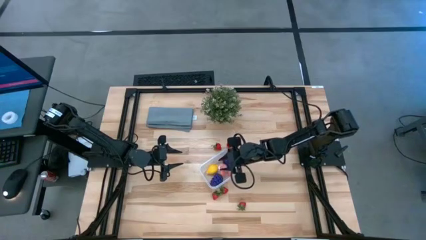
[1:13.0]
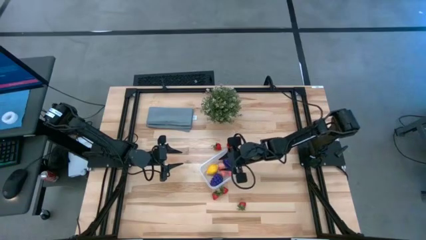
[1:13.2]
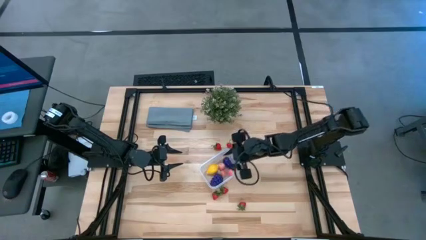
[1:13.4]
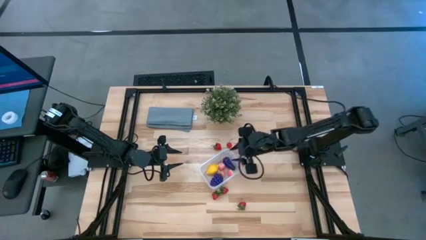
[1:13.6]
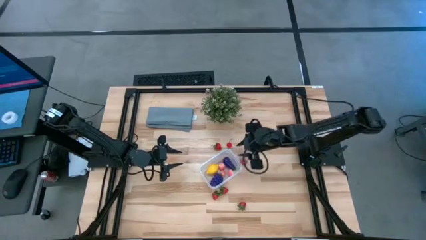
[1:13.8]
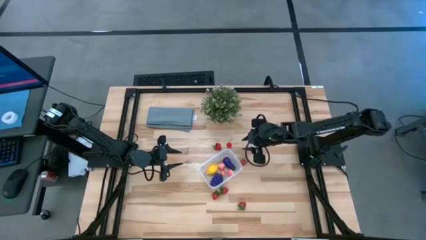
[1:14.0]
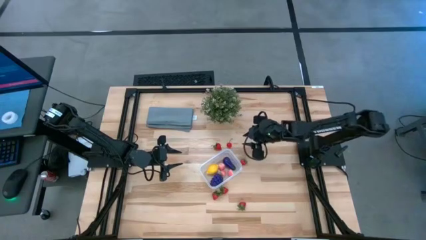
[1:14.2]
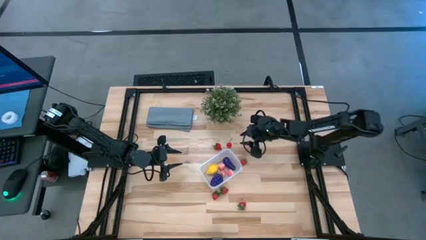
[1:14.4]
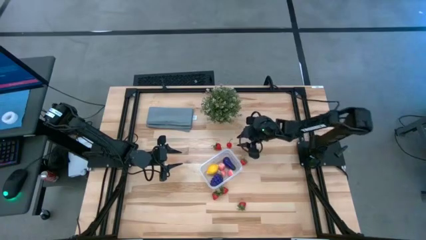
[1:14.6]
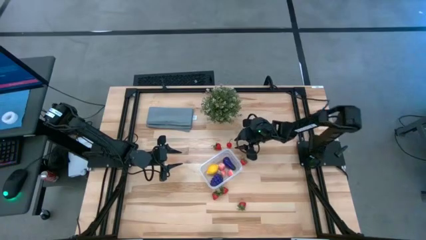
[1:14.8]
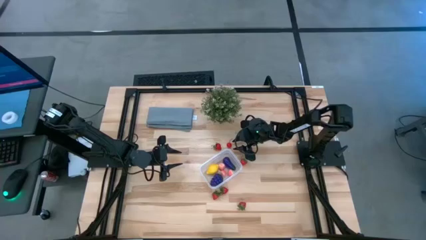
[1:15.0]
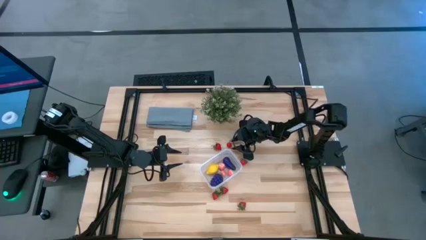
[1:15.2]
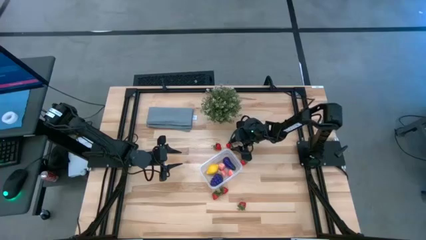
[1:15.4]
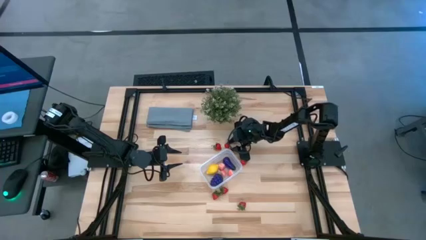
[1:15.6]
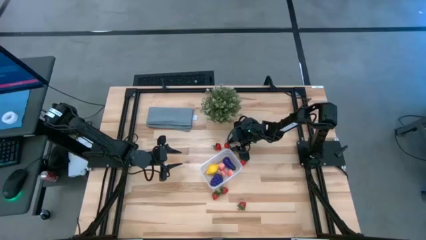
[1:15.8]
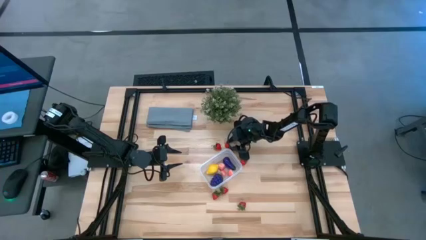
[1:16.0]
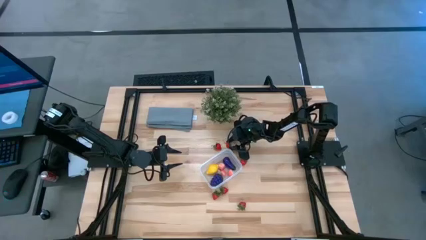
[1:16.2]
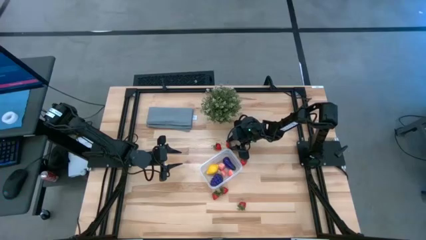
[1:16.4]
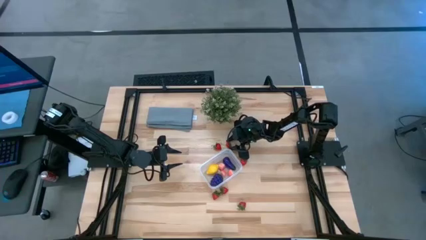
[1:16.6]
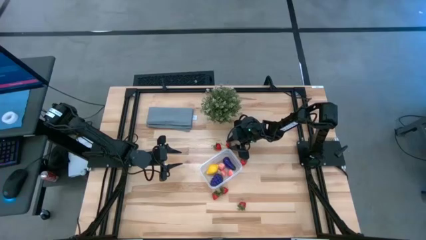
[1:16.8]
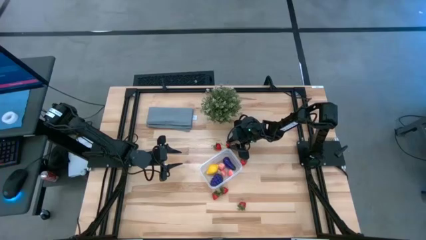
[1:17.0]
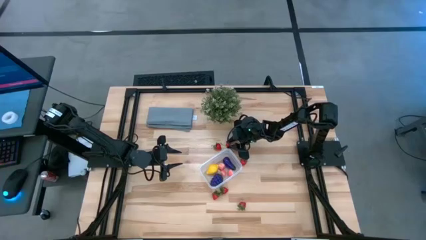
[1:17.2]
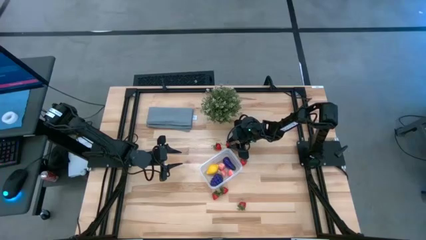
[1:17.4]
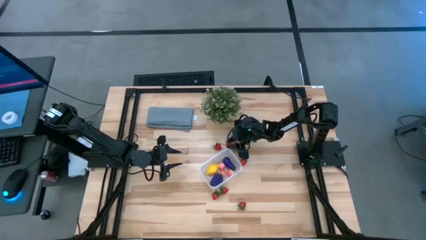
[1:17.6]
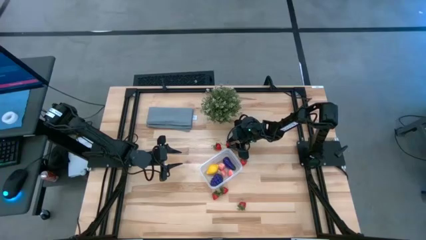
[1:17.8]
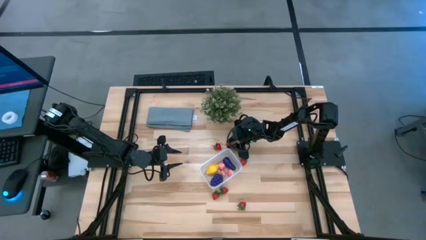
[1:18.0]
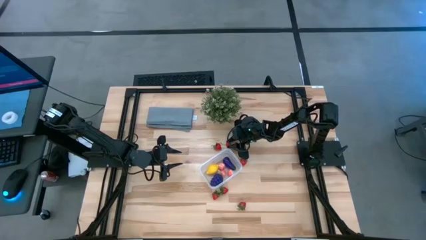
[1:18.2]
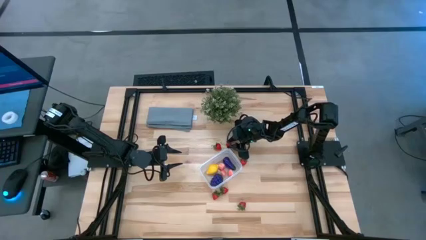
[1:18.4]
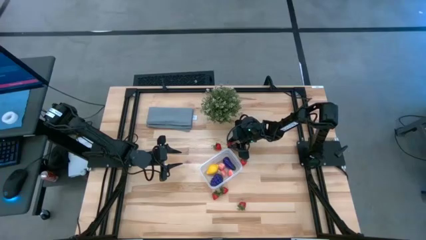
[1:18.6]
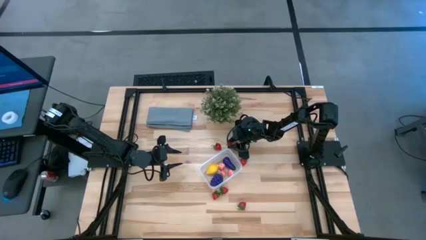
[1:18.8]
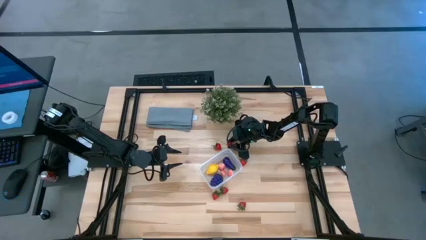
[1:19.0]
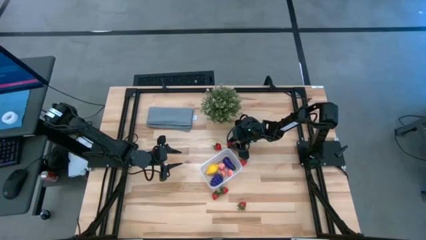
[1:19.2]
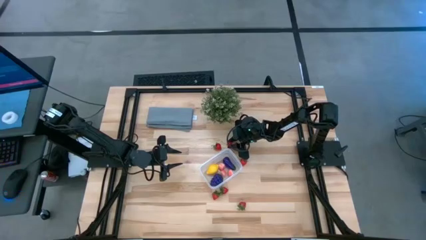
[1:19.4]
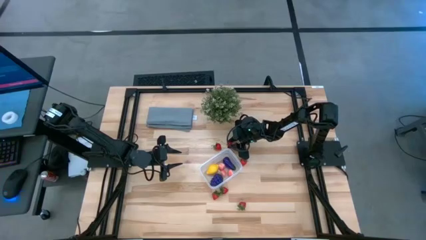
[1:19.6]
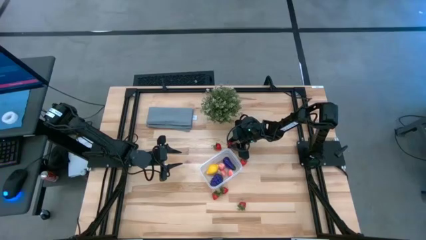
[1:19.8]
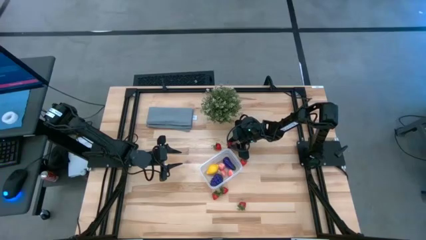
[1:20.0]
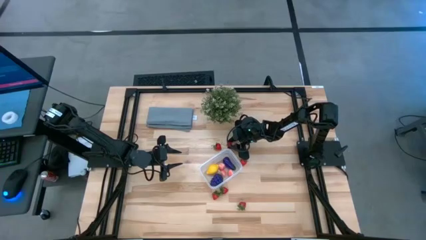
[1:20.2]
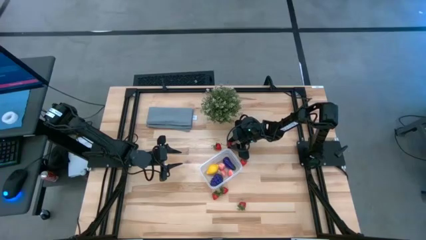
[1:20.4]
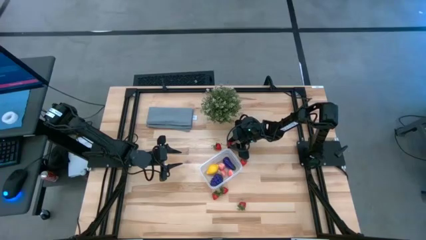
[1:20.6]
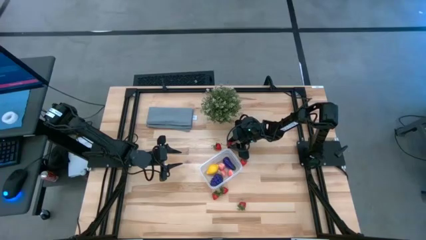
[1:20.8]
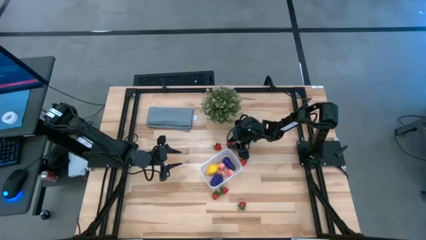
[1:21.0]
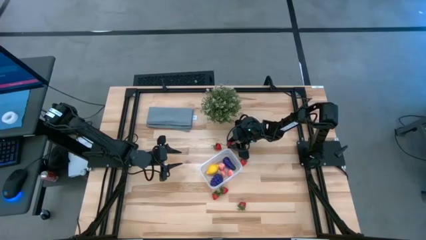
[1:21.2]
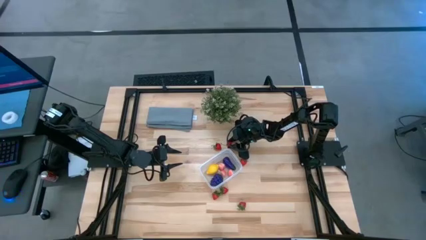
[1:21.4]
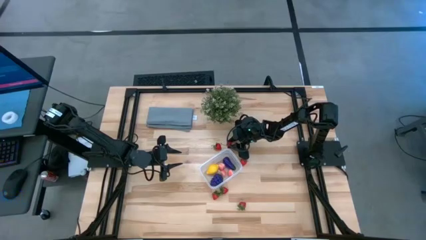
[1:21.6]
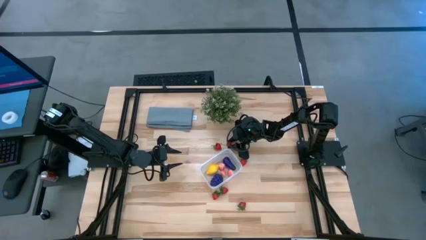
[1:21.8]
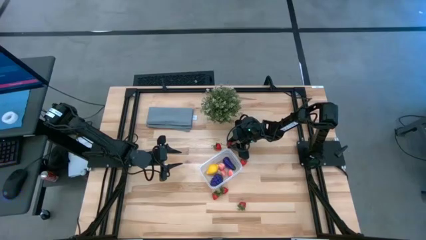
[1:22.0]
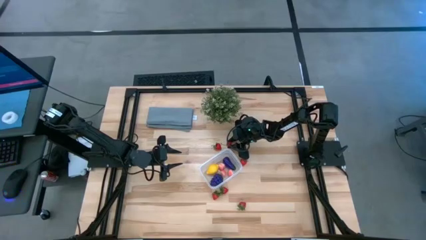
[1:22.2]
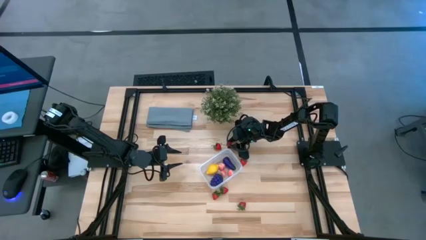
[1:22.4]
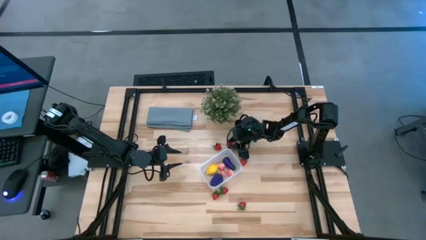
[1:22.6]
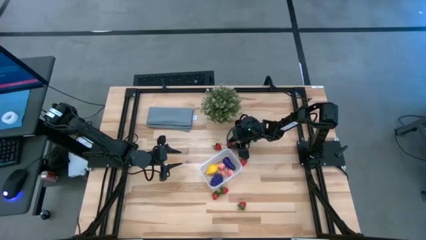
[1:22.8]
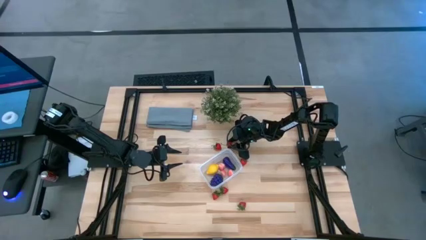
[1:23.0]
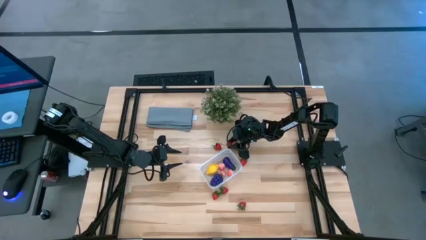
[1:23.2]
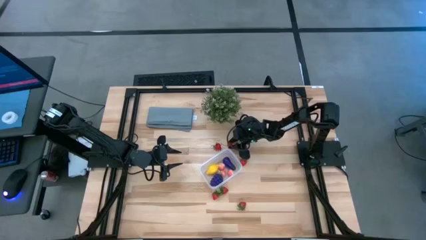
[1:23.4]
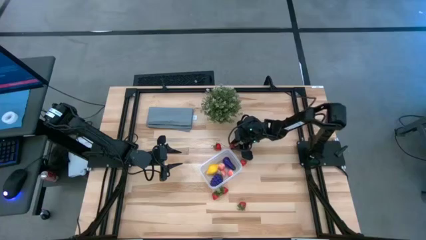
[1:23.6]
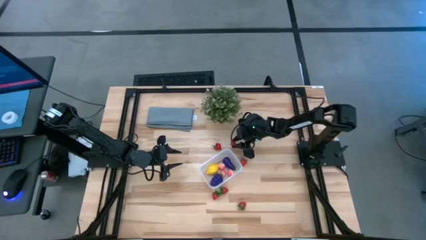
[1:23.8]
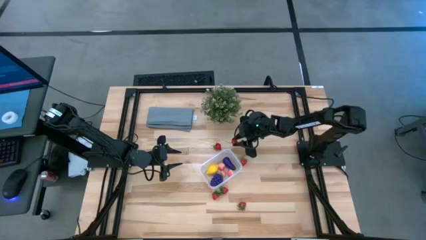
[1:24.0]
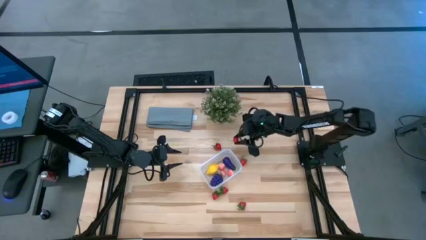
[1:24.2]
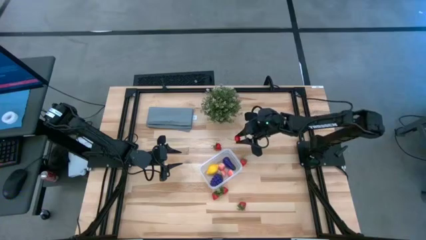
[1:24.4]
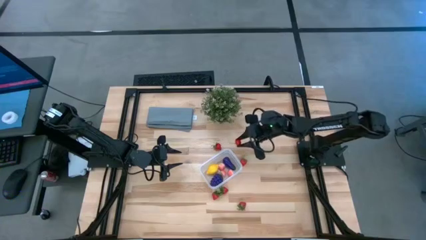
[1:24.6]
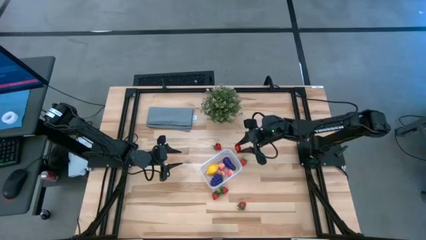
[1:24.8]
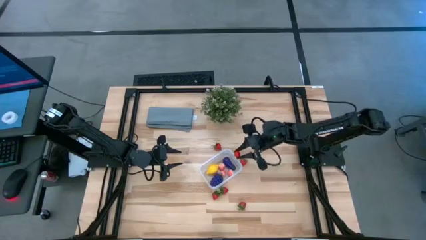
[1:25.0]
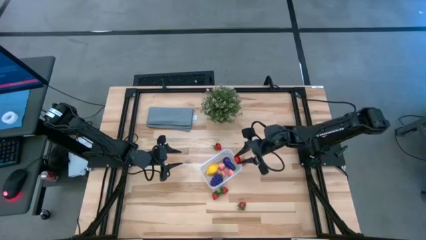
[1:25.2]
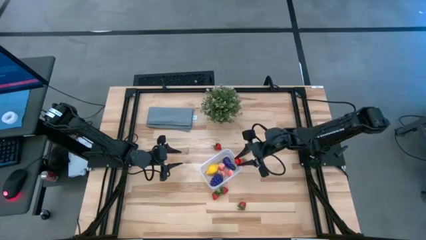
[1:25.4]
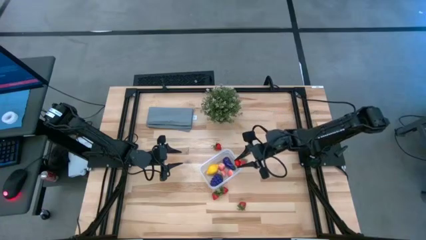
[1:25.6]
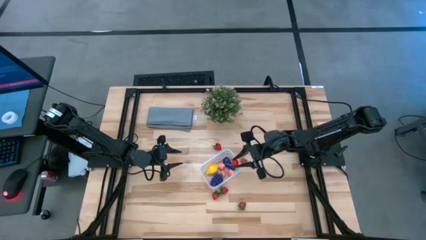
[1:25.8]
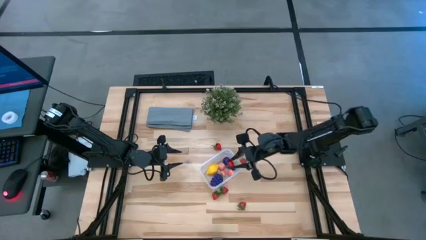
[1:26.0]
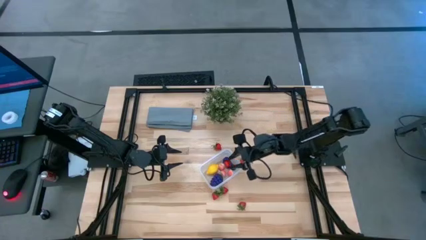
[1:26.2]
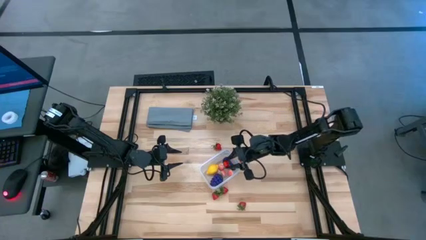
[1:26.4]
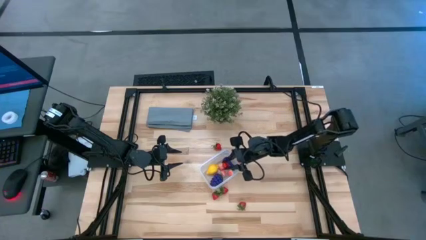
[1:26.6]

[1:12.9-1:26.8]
Task: Pick and placing Produce into tupperware
Put the cherry into the transparent
